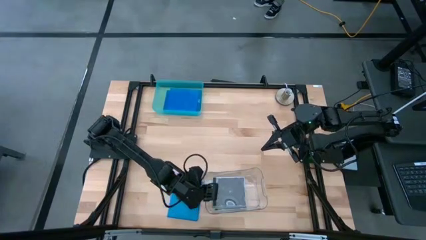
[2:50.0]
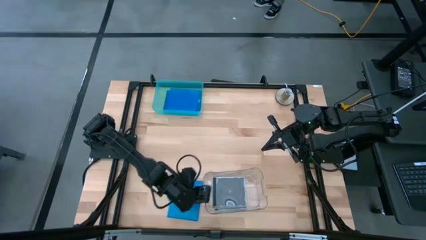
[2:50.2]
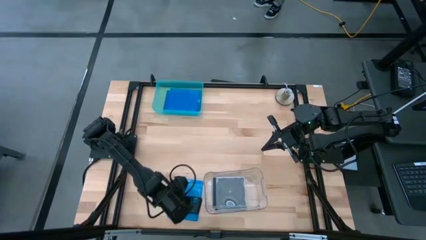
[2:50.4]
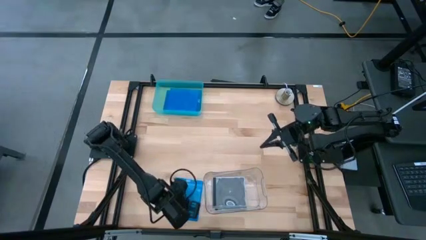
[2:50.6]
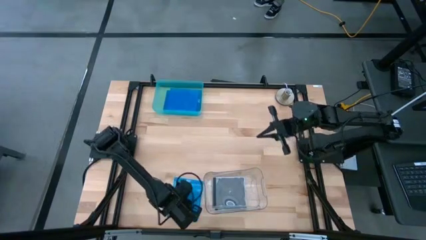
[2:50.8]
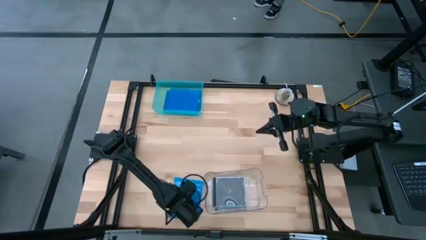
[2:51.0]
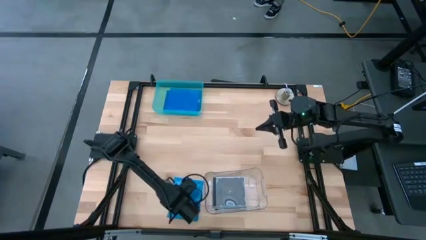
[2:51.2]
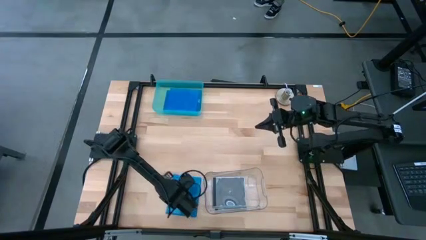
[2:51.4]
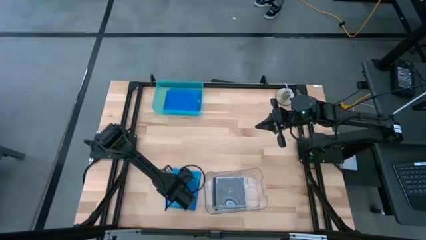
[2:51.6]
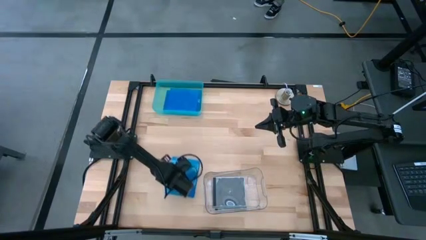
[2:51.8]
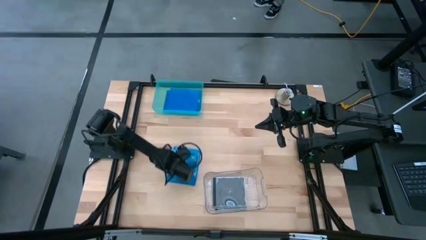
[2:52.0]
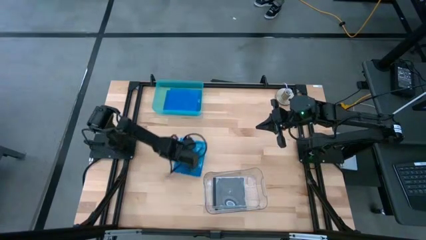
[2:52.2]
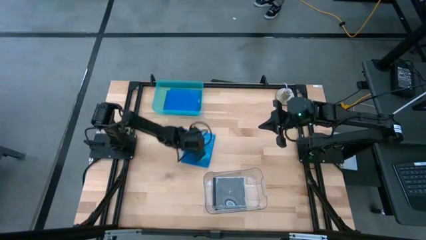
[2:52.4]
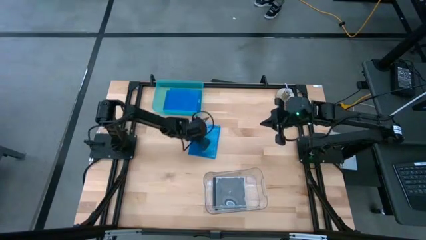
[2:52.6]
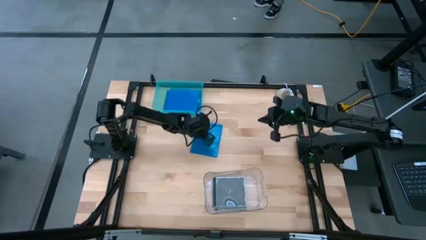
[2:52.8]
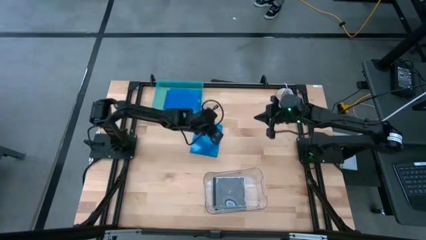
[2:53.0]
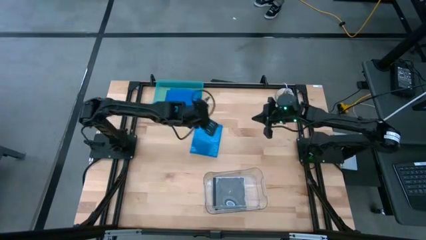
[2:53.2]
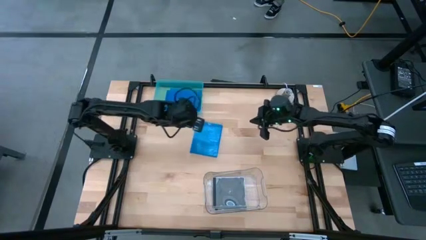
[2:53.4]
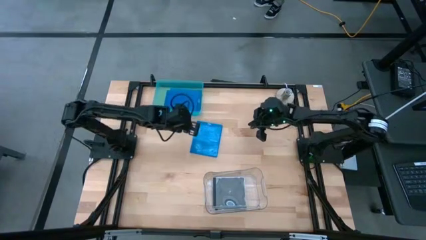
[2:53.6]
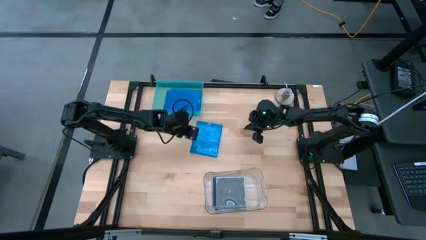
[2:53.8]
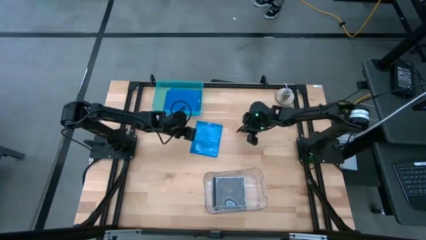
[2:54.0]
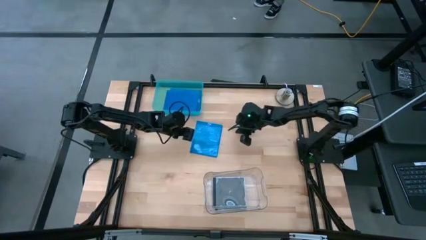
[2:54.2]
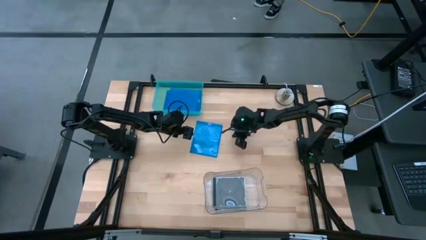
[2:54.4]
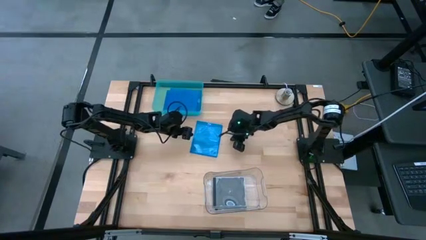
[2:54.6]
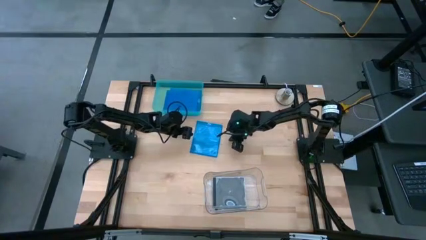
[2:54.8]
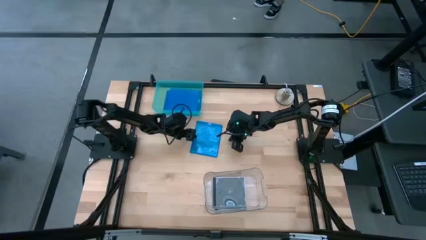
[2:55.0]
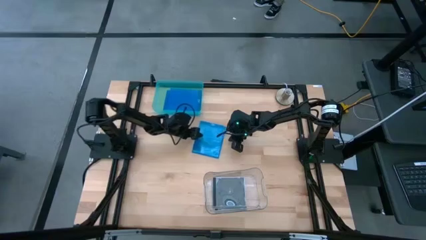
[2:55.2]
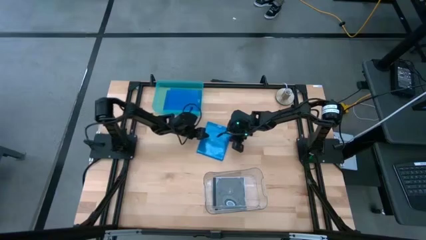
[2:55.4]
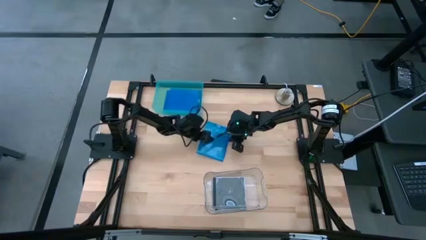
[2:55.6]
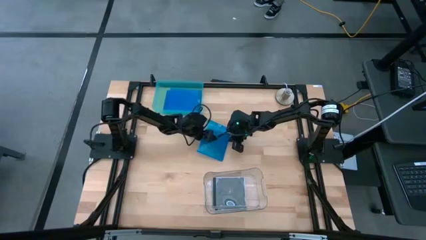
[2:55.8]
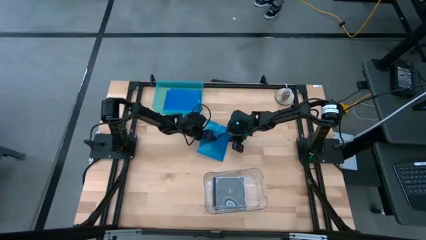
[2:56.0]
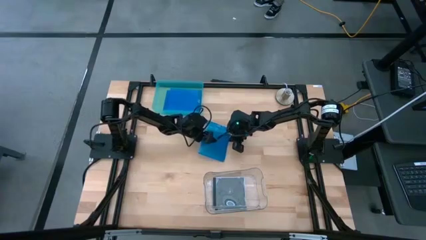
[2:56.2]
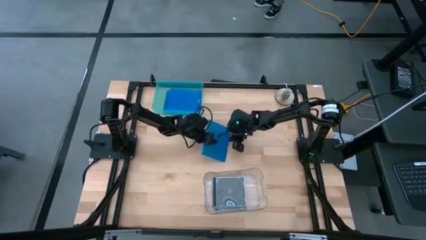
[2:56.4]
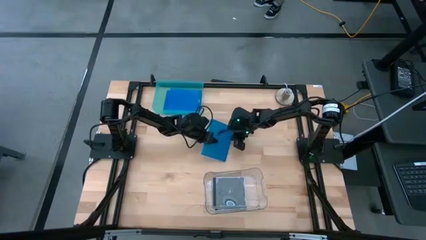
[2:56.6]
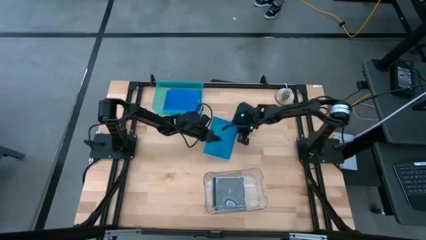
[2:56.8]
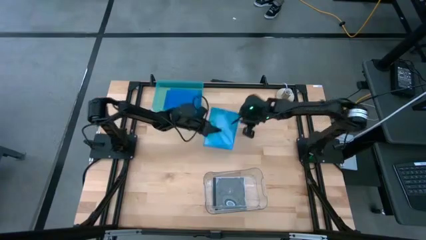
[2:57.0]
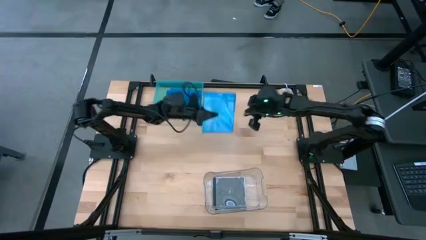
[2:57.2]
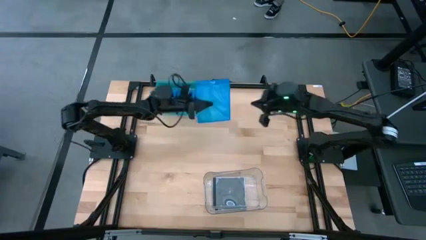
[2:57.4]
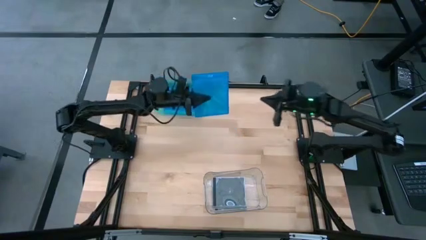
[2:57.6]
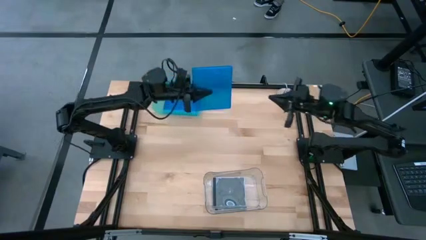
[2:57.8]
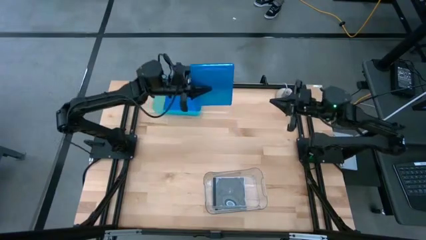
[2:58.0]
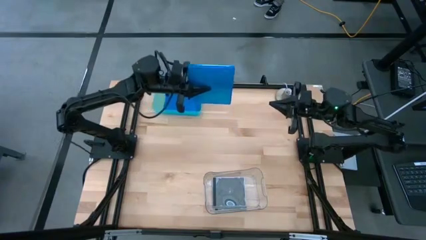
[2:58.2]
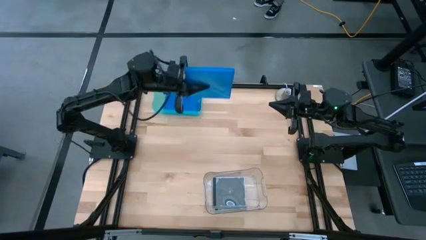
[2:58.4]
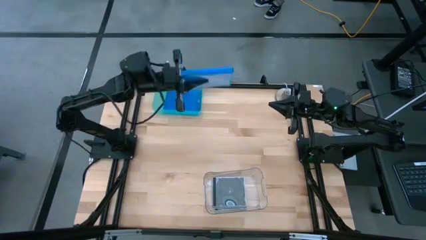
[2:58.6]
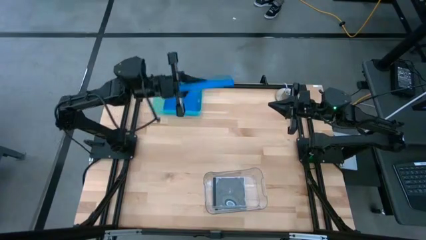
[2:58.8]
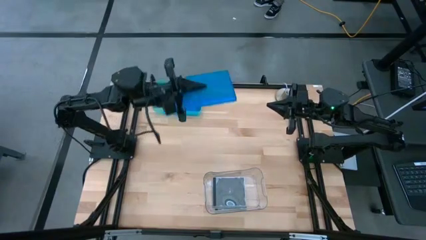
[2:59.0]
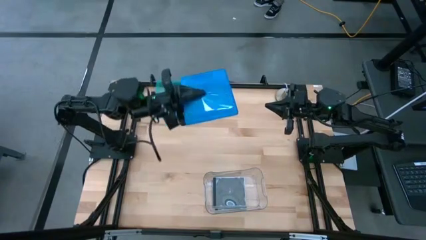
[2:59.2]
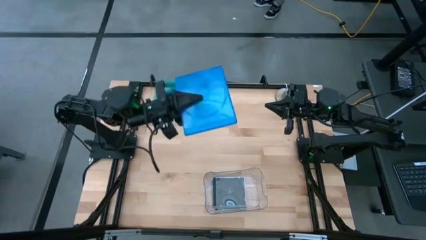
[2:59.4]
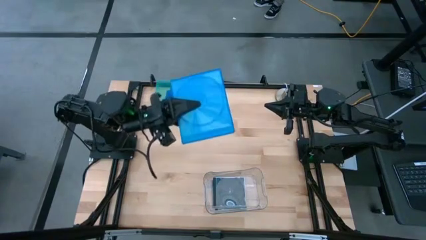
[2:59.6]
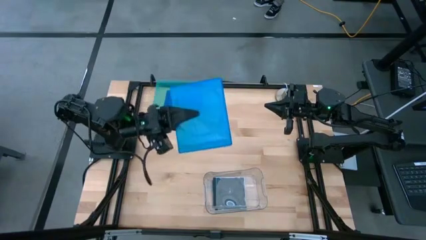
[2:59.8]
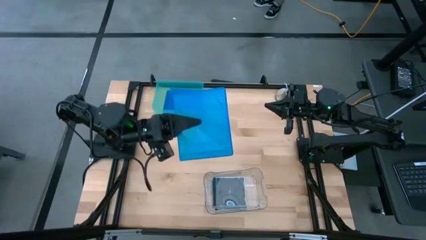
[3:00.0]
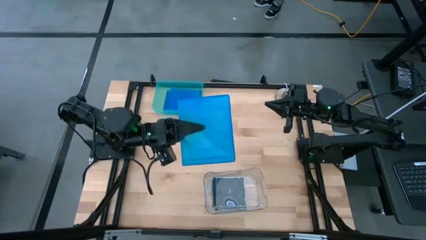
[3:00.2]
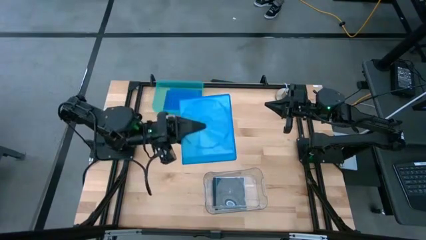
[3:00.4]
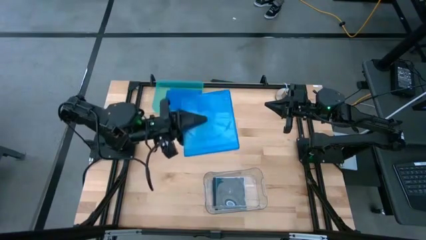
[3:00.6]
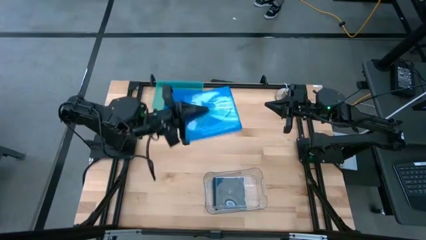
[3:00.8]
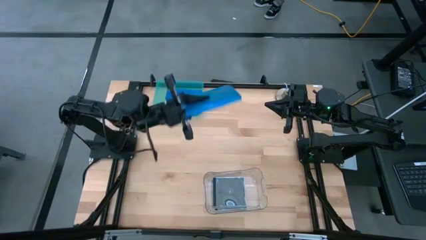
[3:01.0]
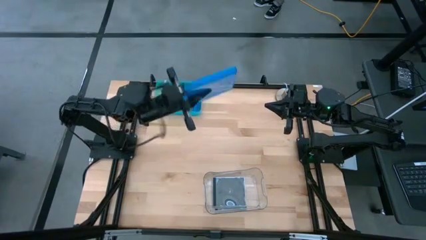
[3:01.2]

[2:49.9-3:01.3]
Task: Pick & place jewel cases by type
Put the dark blue CD case into the light blue bin

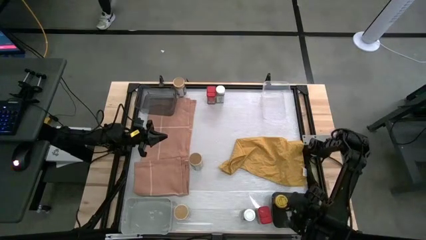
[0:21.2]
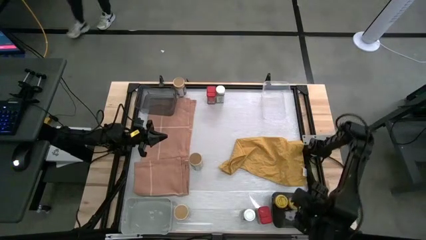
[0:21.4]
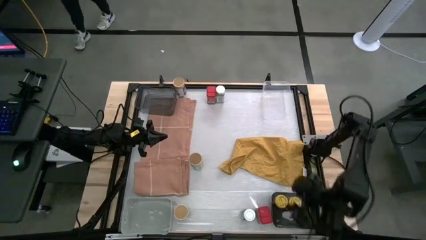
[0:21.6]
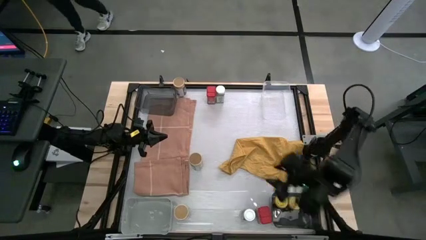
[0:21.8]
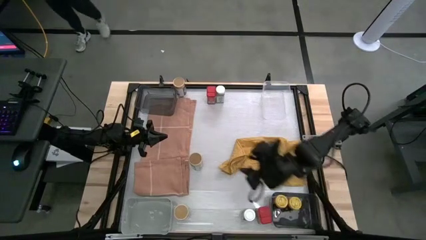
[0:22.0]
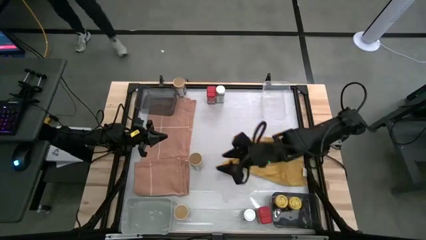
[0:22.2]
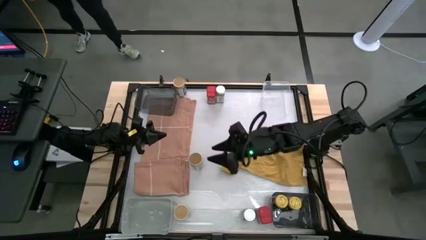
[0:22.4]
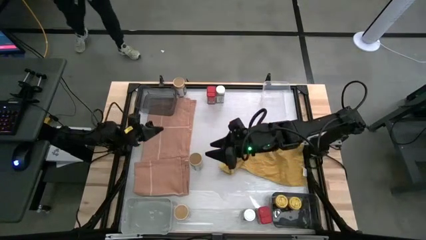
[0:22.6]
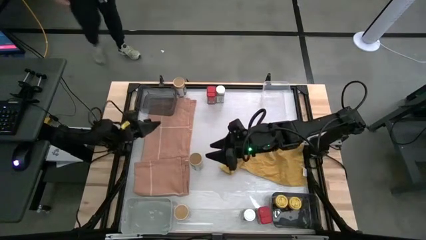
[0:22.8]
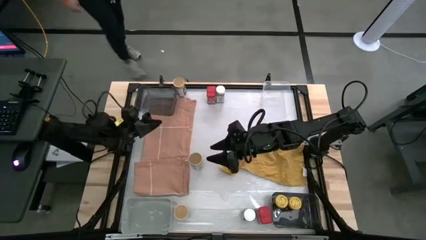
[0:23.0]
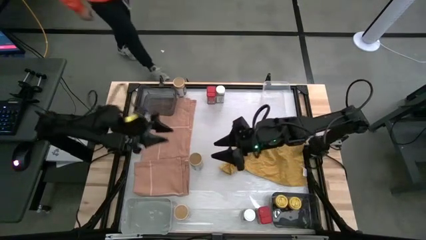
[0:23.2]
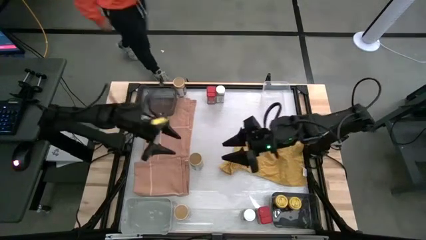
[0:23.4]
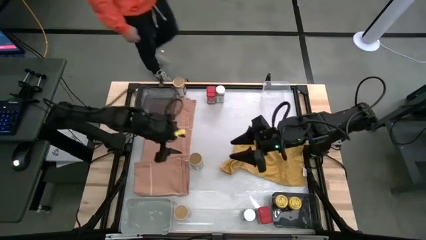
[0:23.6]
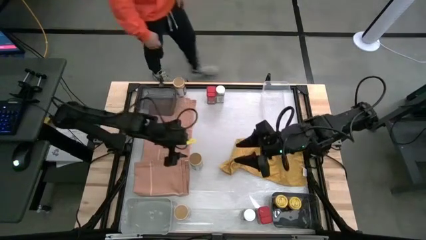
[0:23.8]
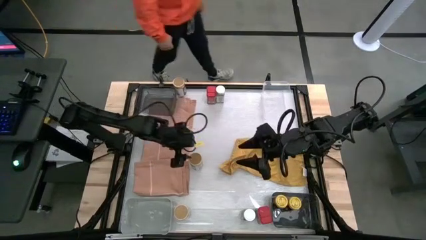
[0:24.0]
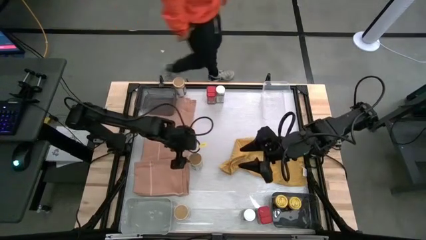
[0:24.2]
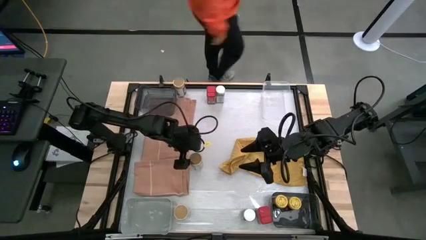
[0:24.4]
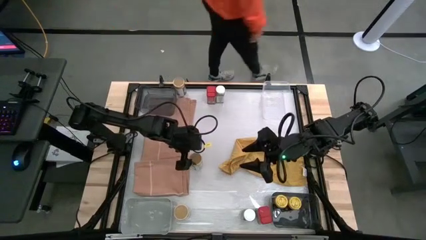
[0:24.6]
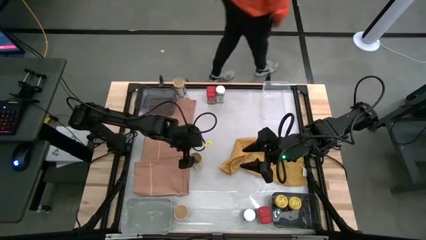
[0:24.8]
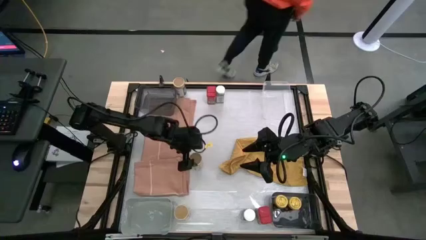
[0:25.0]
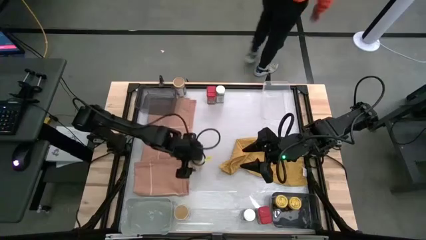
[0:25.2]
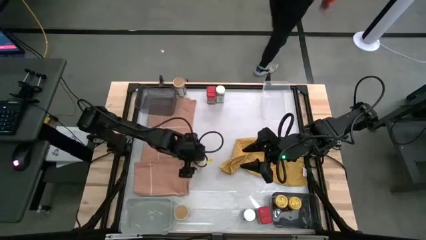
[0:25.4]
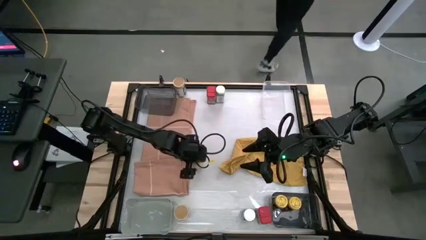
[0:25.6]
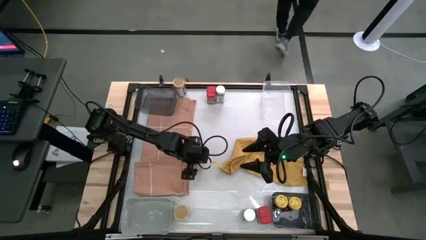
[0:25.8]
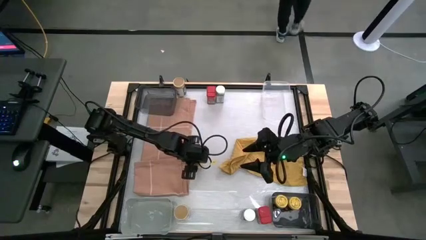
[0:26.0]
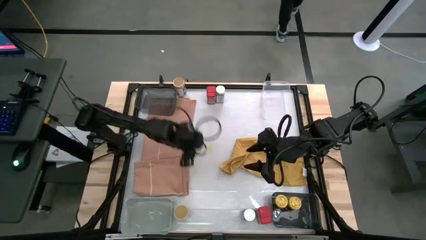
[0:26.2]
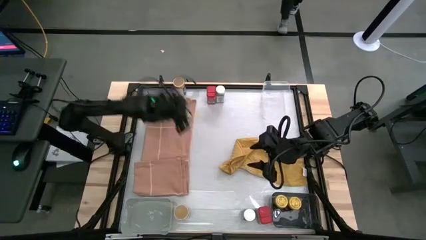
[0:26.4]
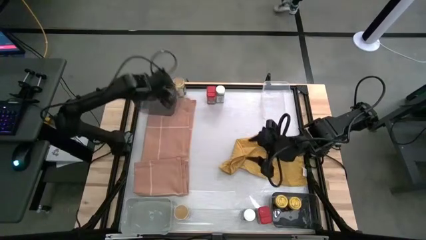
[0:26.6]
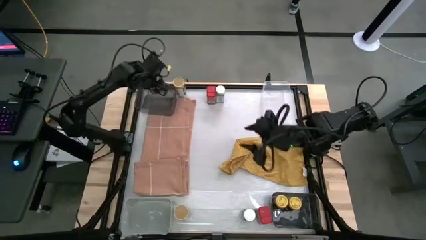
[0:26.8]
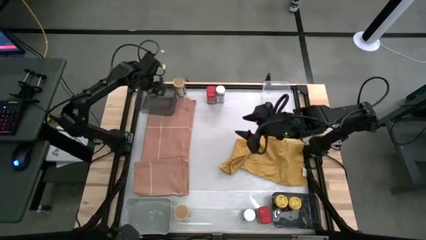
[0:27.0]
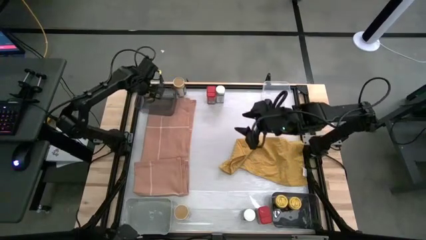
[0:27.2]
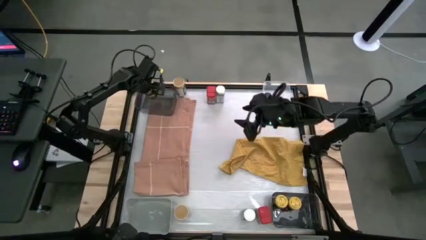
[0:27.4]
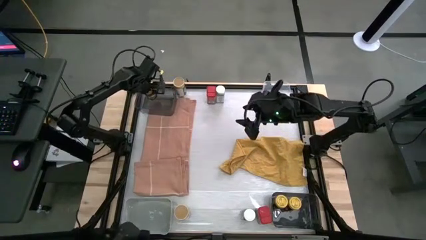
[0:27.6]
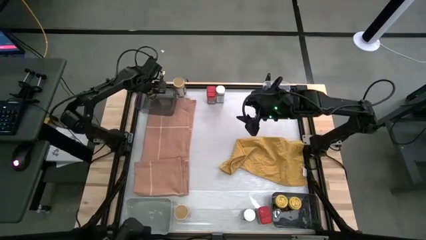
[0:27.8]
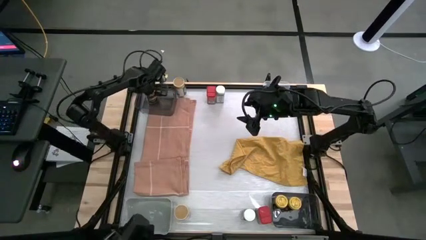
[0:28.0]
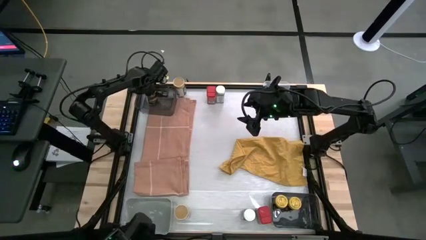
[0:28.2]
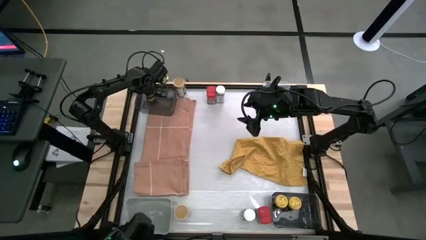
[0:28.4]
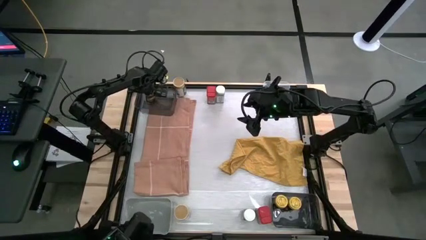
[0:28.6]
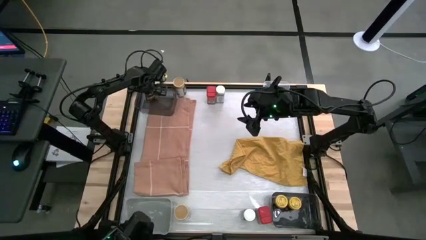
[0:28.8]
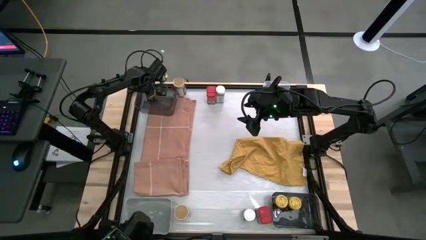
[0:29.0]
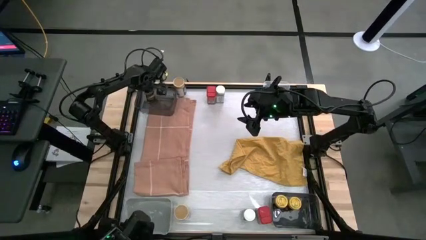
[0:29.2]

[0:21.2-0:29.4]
Task: Sort spices by type
Put the middle gold seasoning bottle into the top black bin
